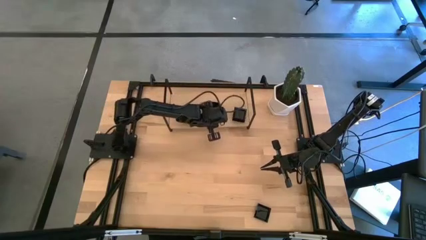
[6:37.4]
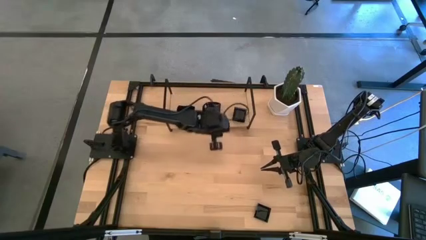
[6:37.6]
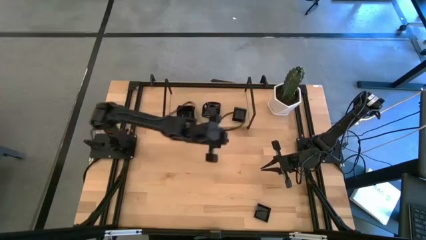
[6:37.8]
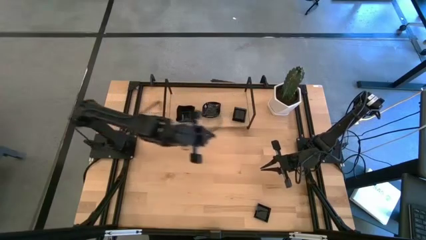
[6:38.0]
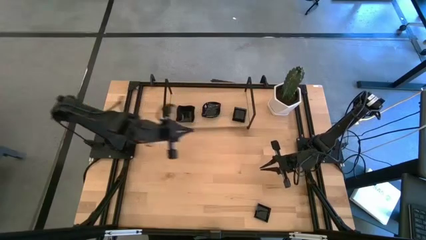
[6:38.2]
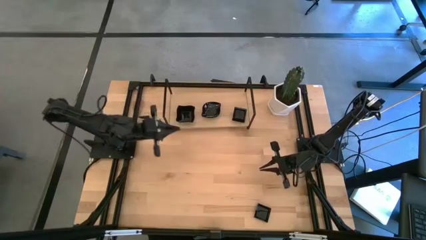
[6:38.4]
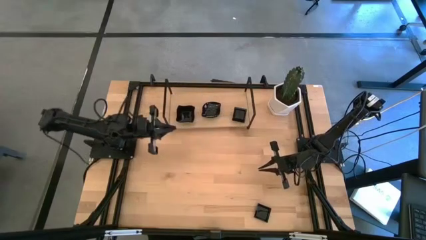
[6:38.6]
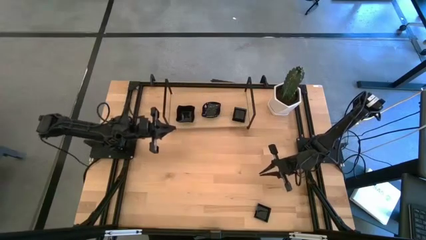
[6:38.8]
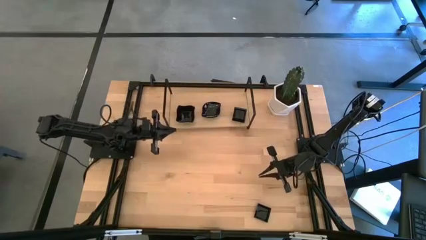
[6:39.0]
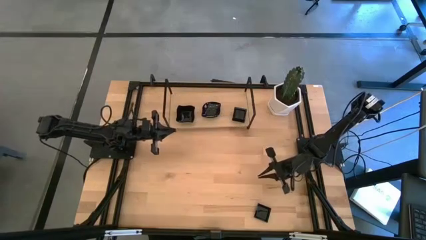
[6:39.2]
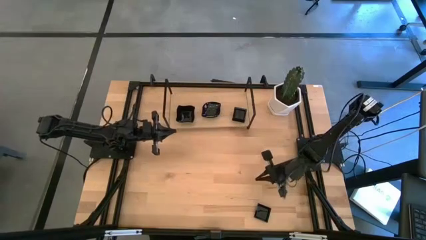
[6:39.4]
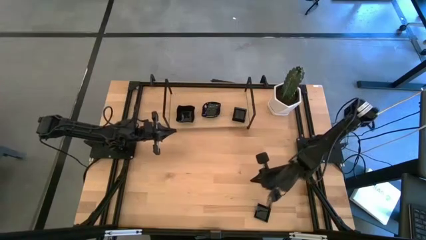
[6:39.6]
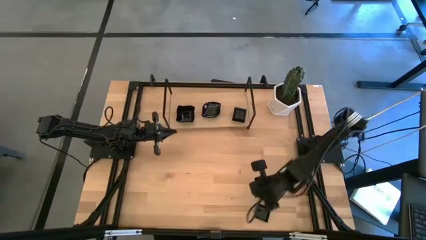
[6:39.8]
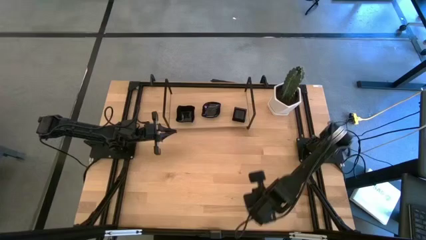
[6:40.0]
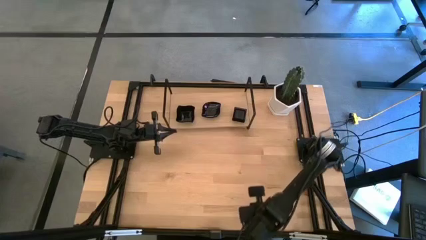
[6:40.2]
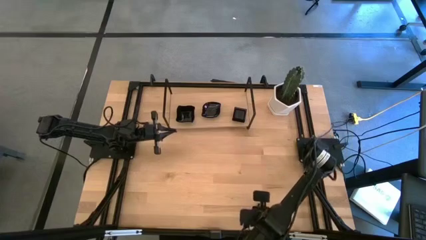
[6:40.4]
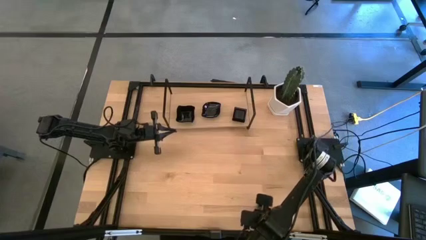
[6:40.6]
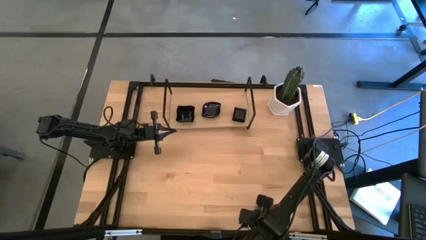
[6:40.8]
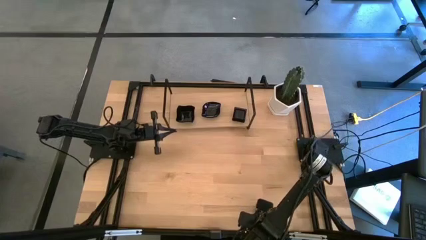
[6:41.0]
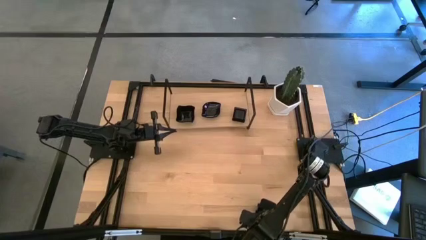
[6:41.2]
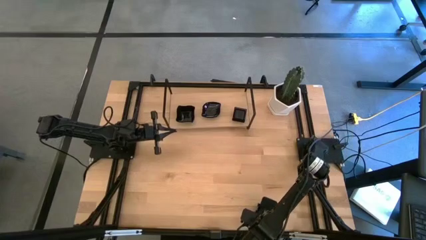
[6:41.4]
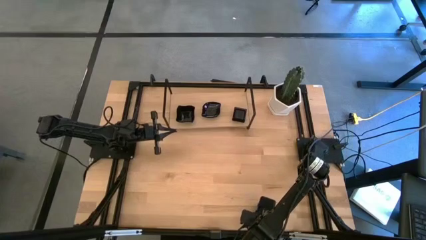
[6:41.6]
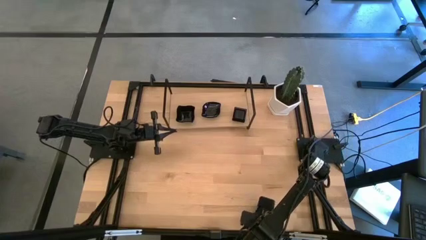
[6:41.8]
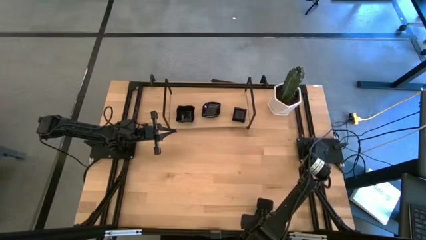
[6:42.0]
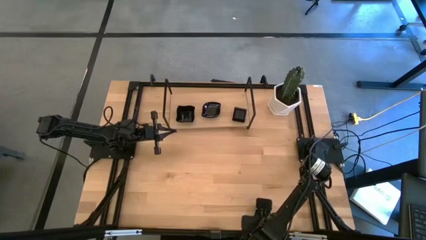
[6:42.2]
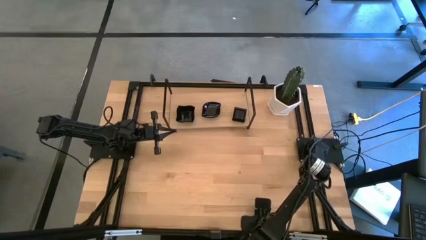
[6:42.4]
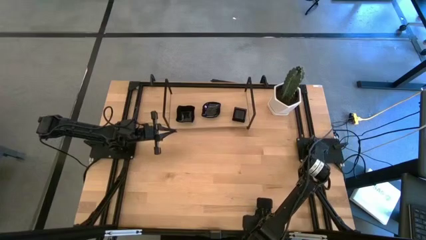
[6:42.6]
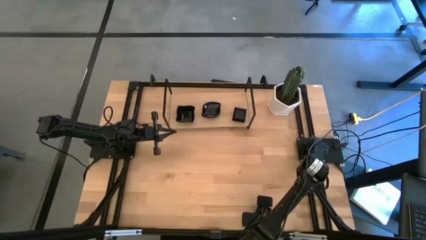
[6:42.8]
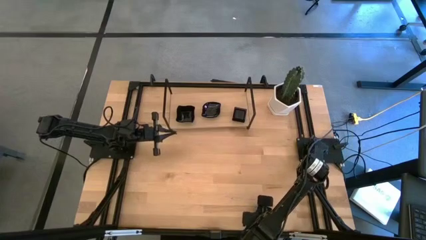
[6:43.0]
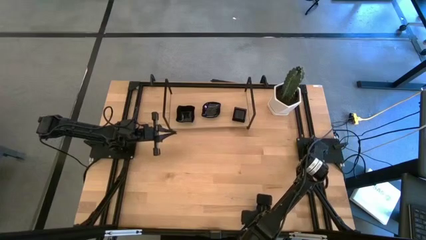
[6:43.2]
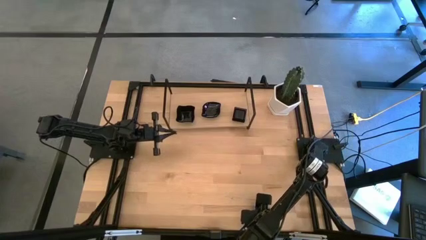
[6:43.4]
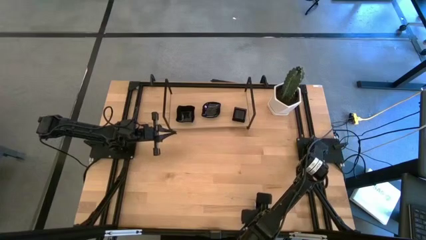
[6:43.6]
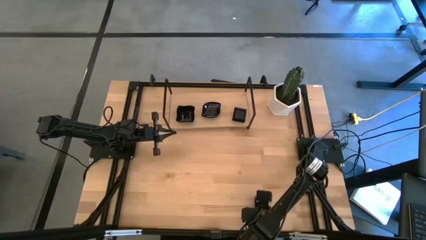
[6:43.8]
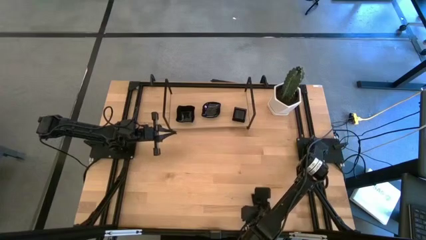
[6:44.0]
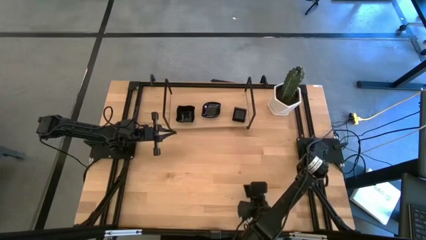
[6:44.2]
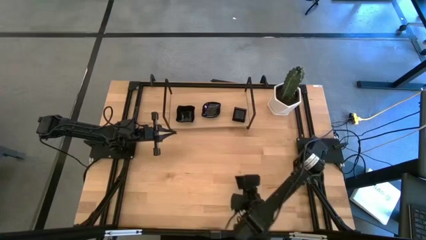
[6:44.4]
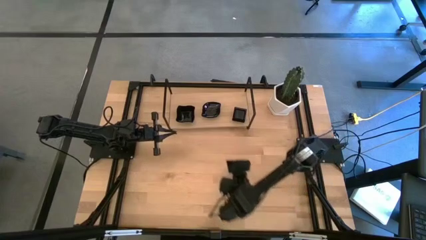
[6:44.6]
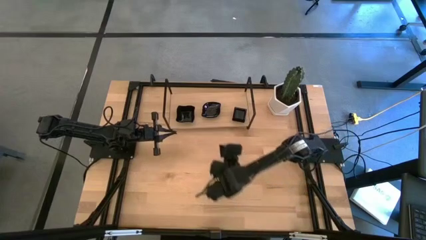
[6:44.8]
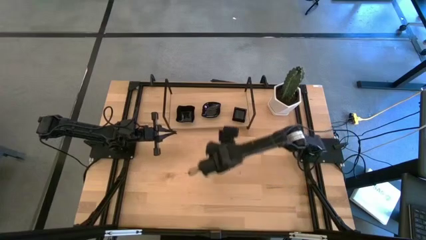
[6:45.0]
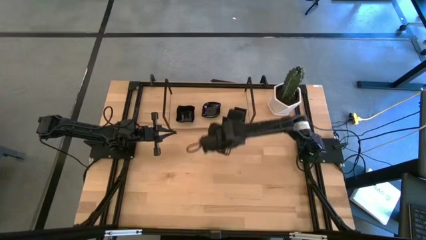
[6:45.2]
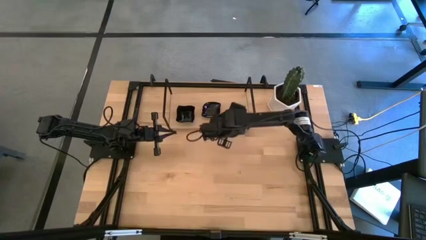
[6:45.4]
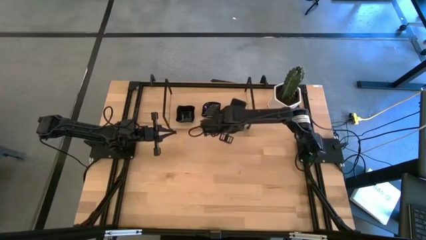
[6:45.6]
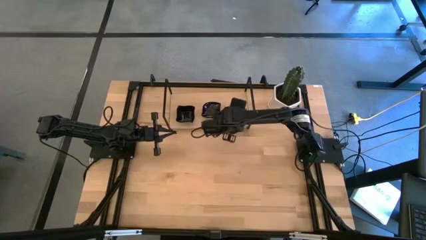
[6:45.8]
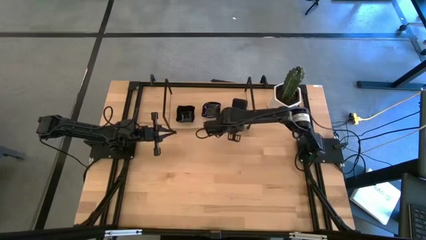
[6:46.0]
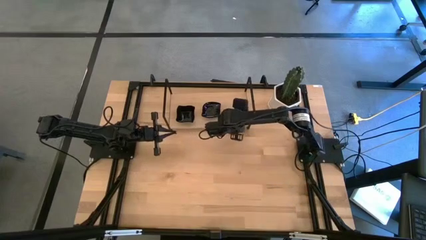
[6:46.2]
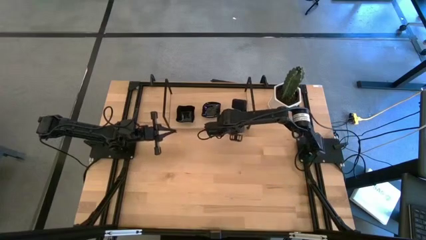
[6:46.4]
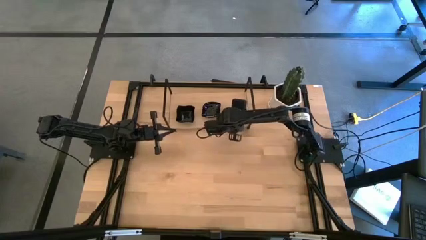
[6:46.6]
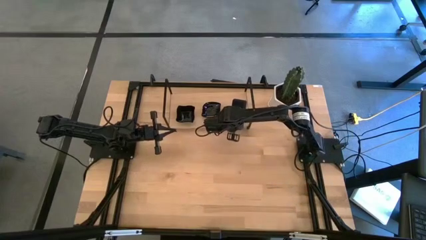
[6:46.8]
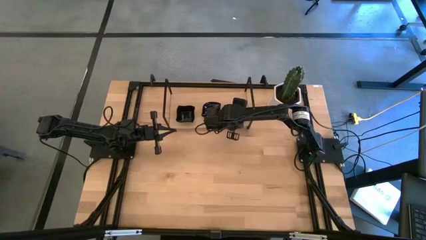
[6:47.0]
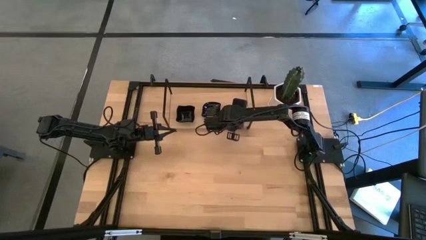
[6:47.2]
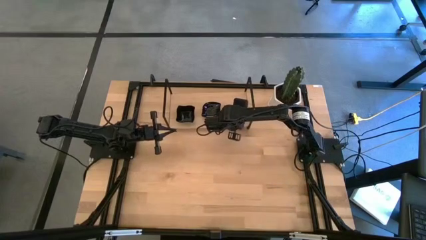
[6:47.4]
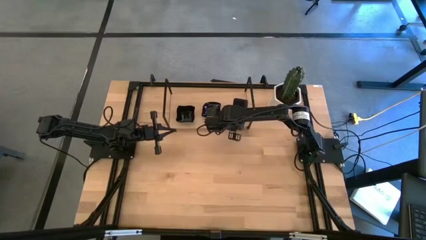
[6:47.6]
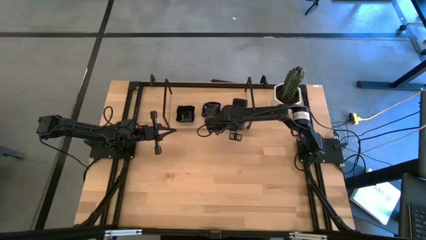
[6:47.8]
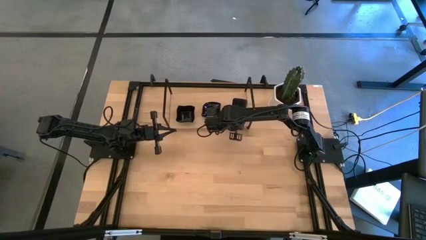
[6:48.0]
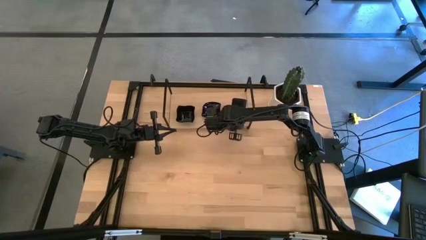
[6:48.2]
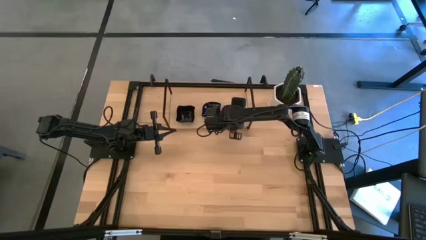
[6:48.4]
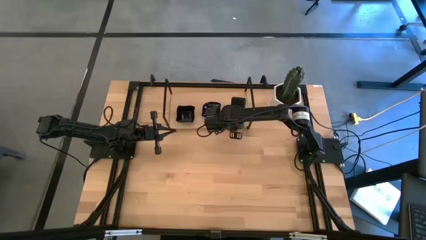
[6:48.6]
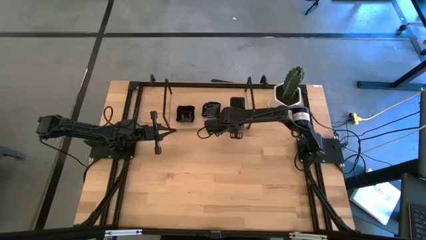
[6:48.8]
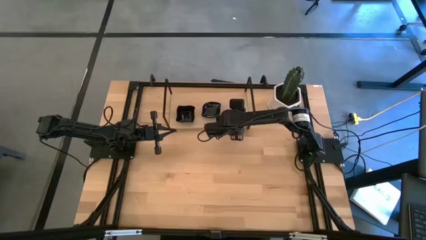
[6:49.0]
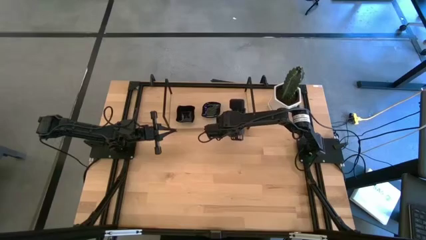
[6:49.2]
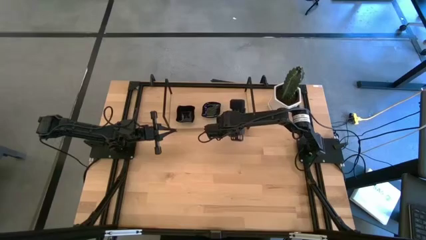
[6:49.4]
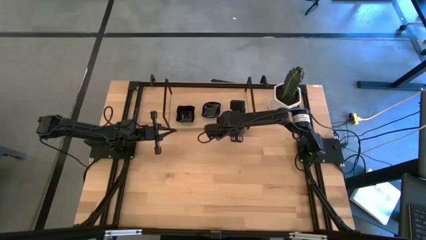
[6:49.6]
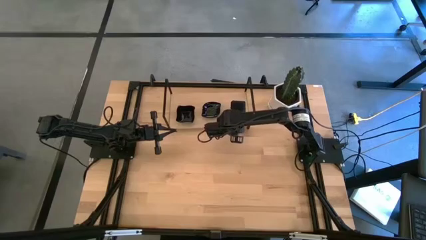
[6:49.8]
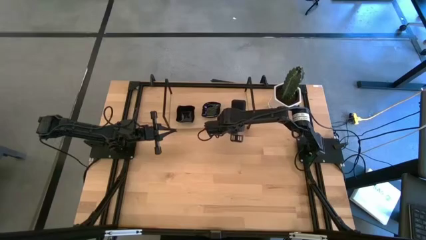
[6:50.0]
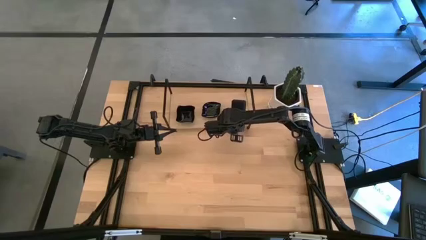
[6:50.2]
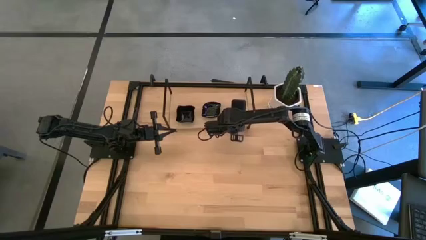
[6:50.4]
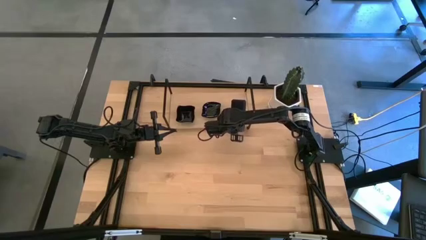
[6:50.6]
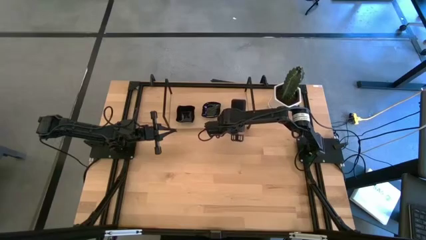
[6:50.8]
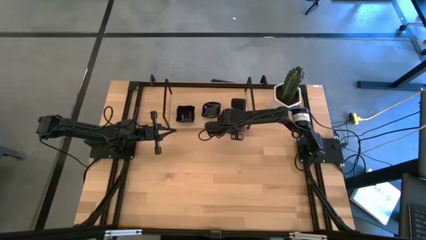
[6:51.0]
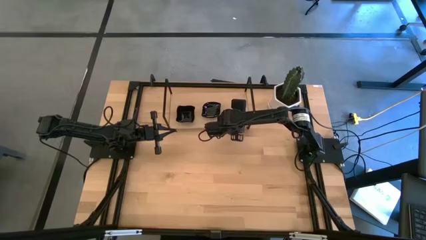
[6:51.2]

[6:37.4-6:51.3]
Task: Pick & Place Mini shaped plates
Stack the square plate on the top of the square plate on the shelf

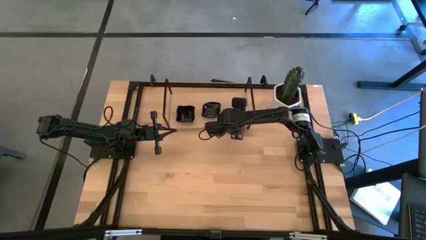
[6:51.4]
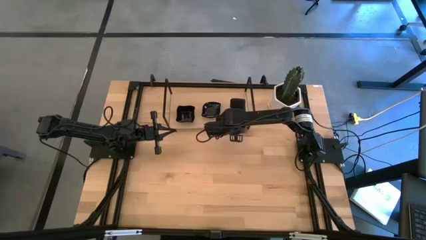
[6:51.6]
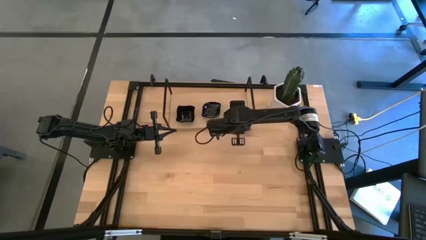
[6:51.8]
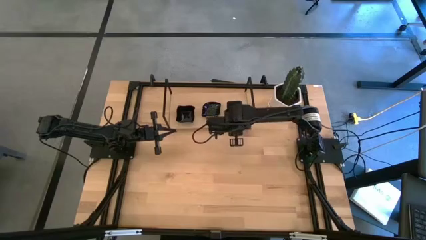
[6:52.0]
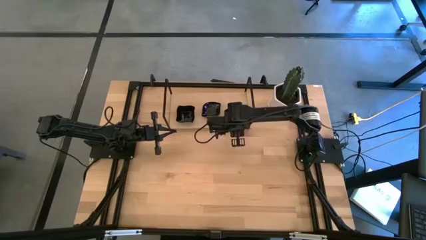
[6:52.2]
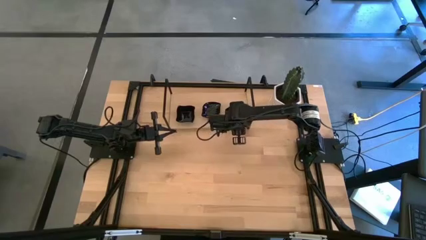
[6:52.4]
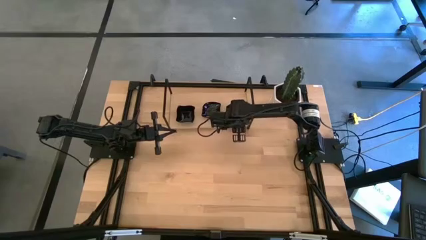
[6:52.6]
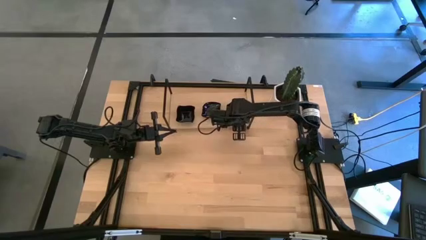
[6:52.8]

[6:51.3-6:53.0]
Stack the square plate on the top of the square plate on the shelf
